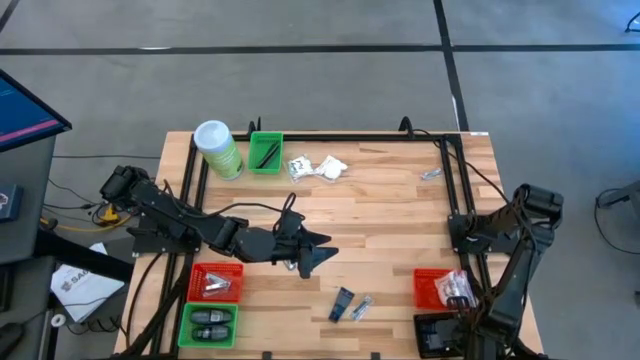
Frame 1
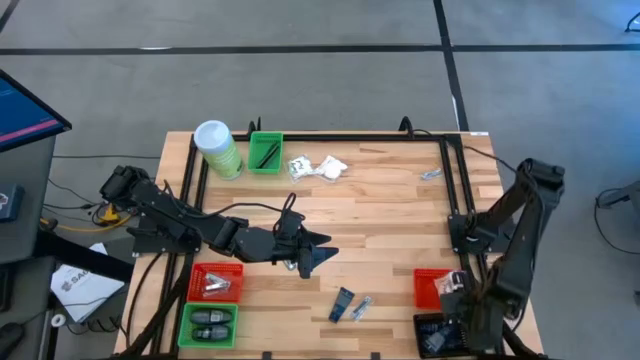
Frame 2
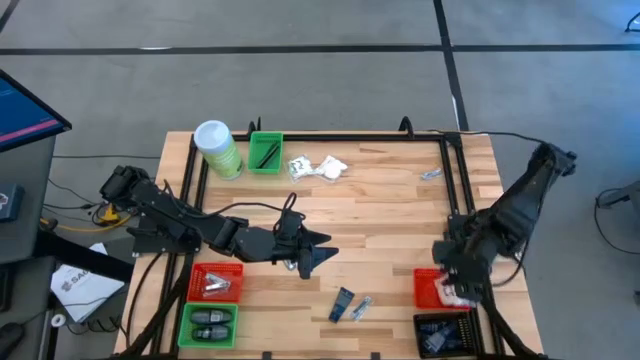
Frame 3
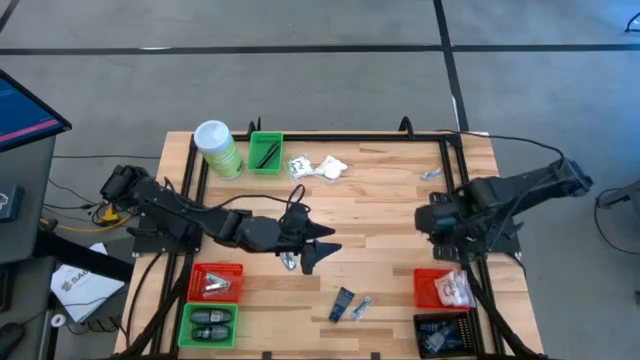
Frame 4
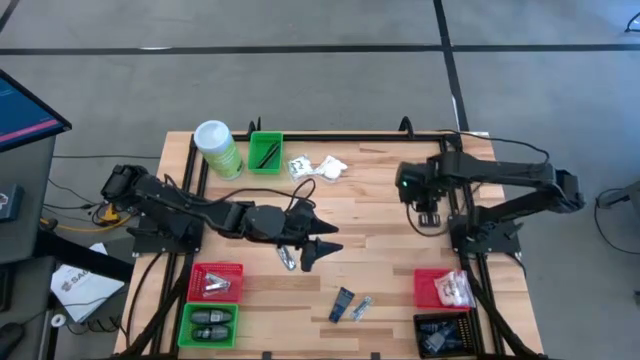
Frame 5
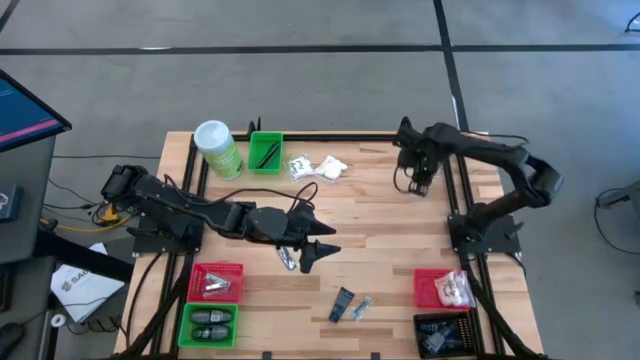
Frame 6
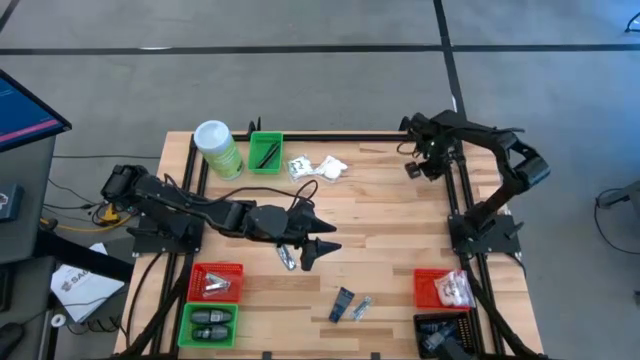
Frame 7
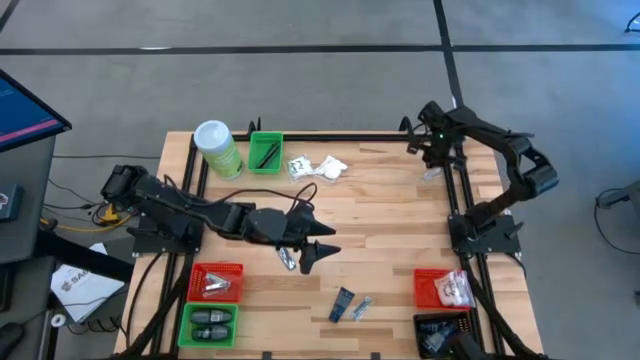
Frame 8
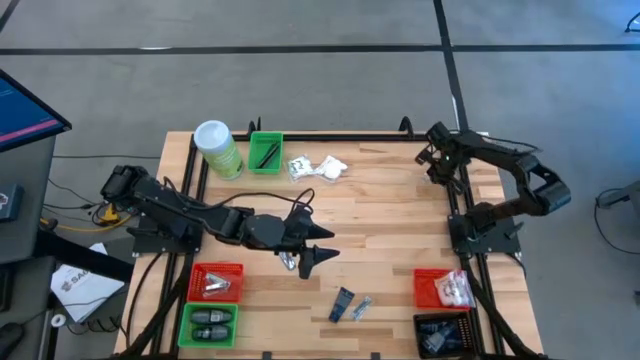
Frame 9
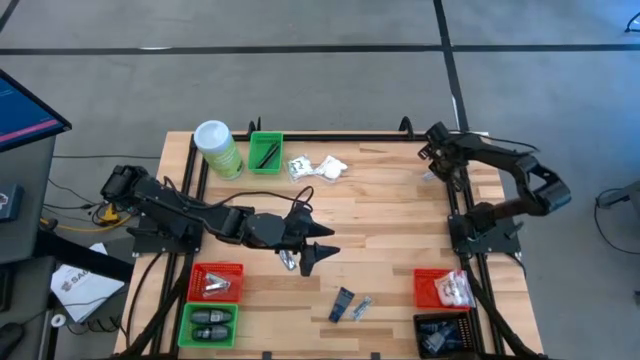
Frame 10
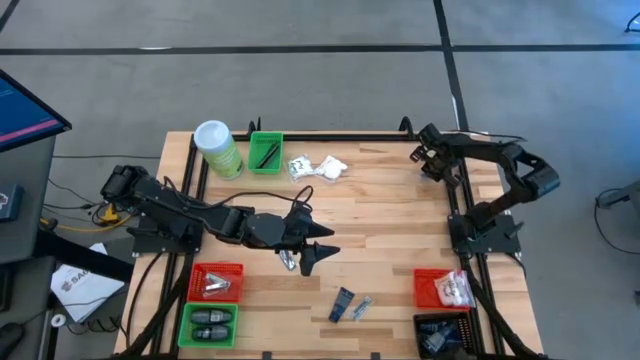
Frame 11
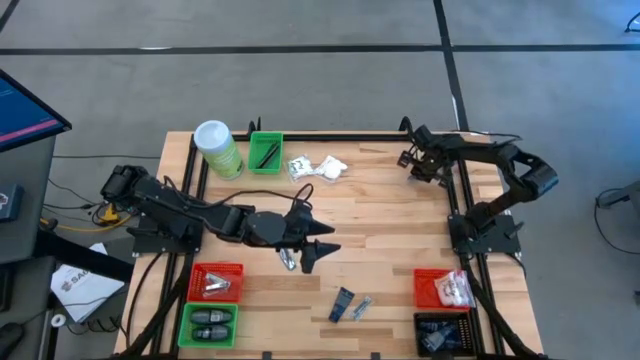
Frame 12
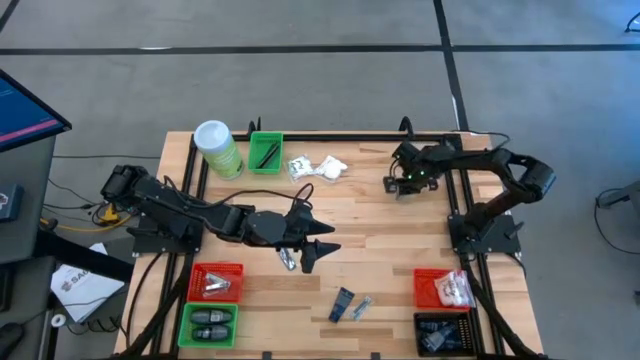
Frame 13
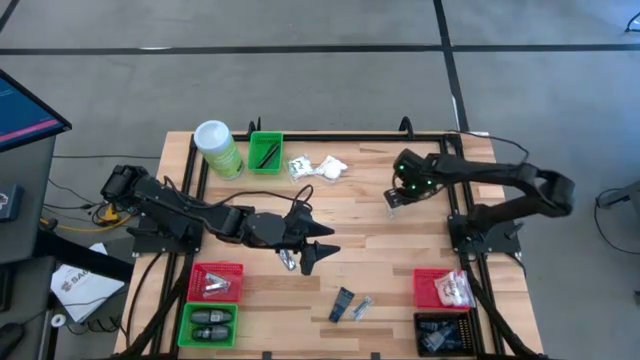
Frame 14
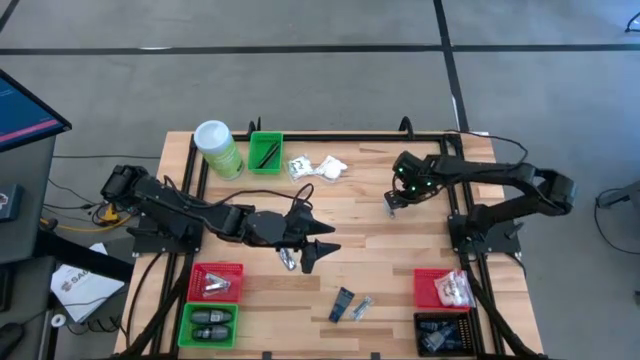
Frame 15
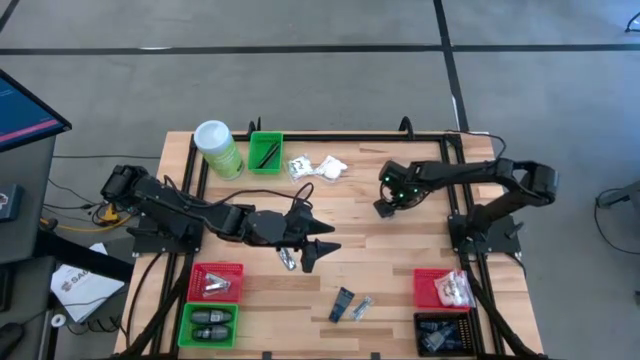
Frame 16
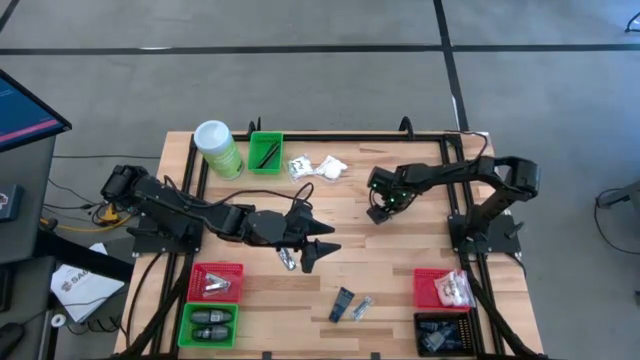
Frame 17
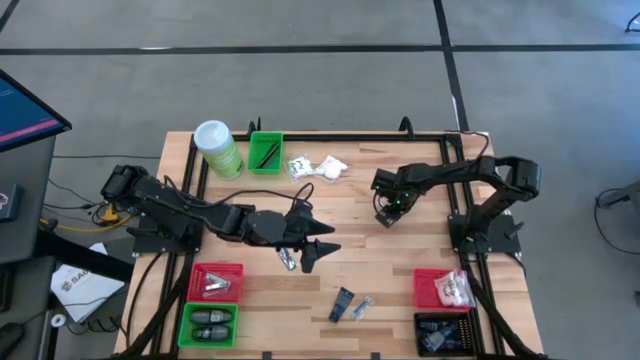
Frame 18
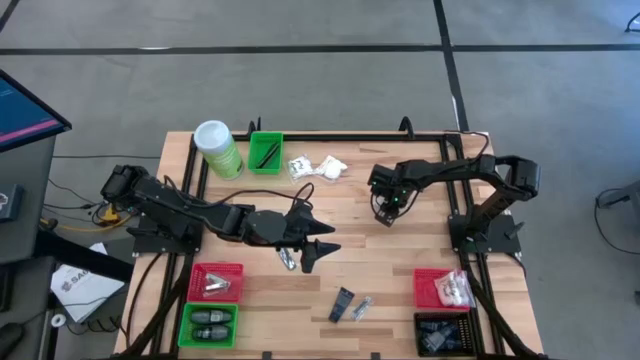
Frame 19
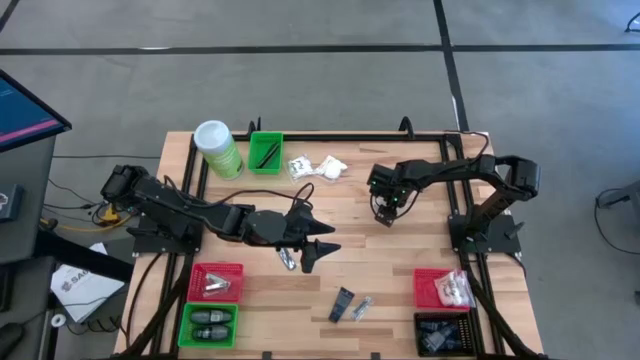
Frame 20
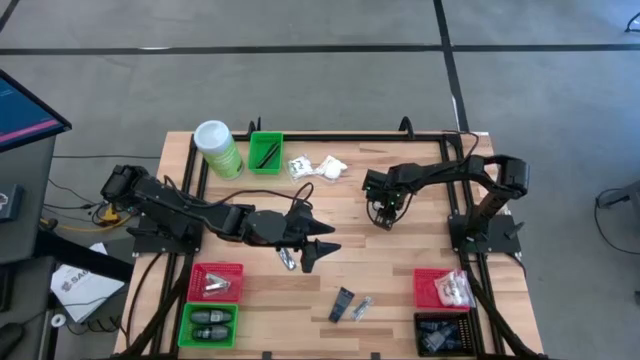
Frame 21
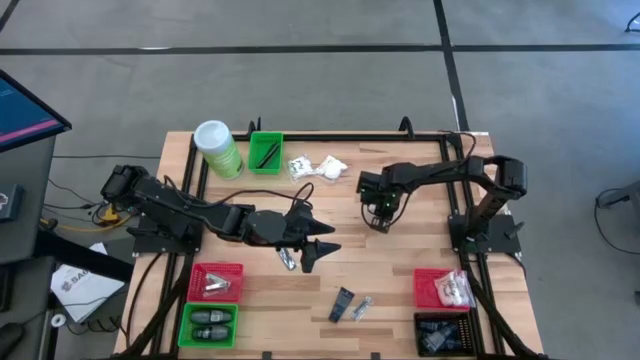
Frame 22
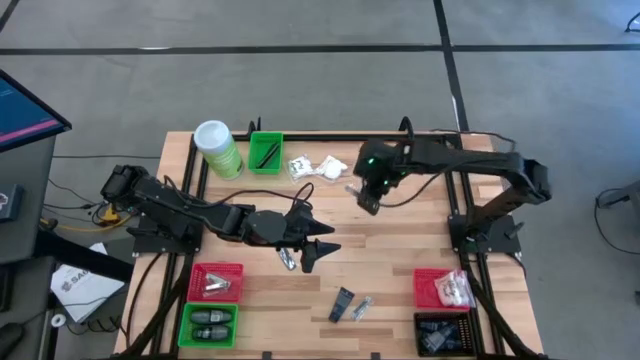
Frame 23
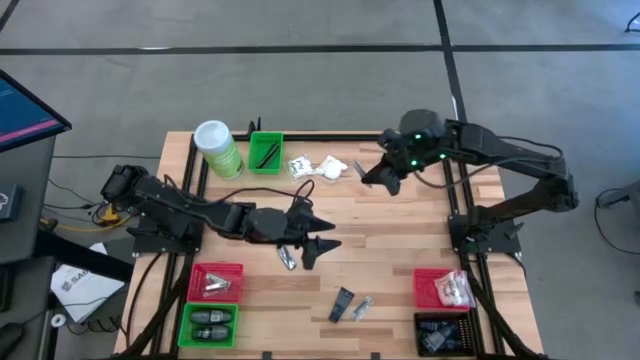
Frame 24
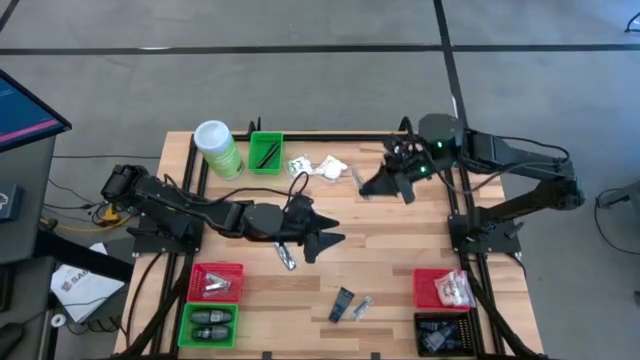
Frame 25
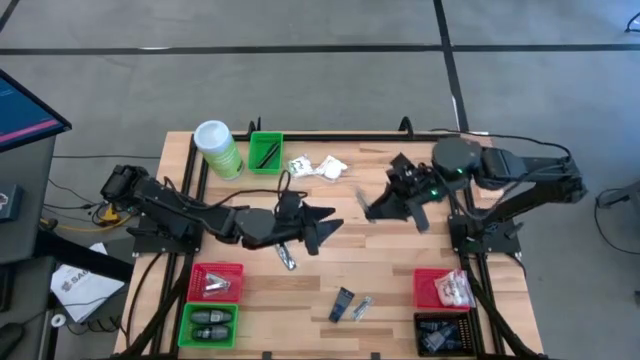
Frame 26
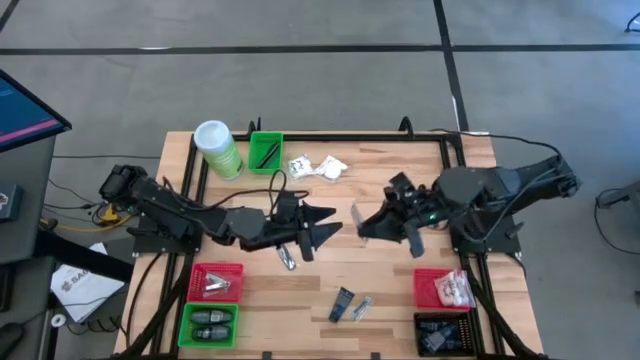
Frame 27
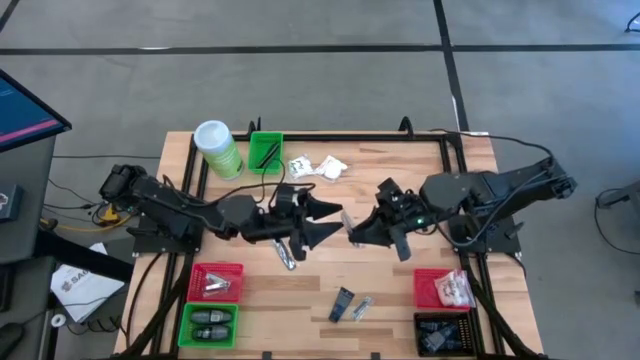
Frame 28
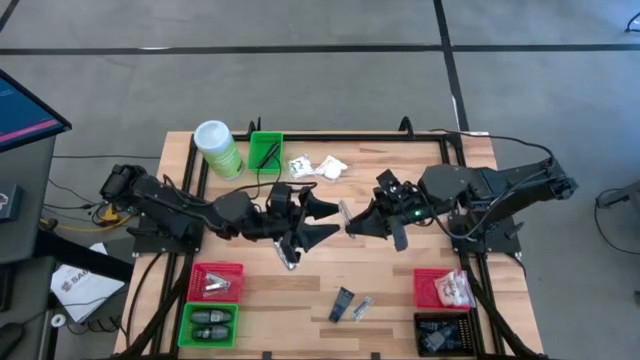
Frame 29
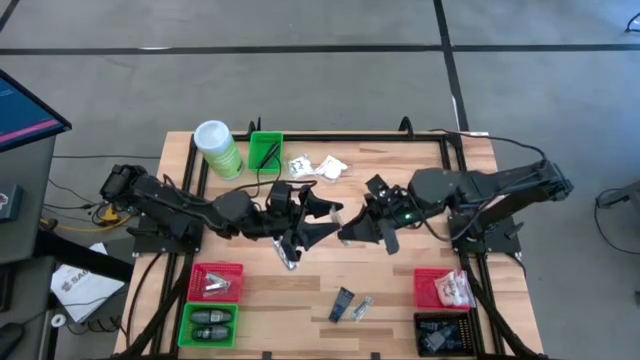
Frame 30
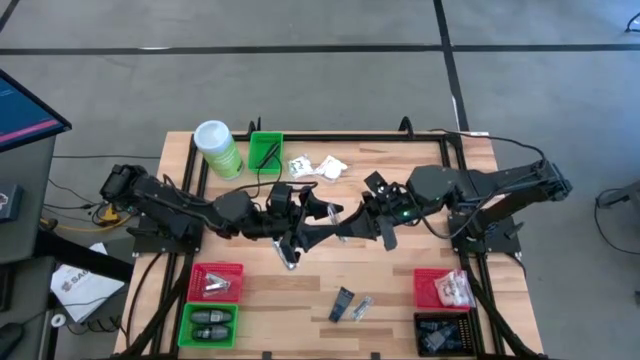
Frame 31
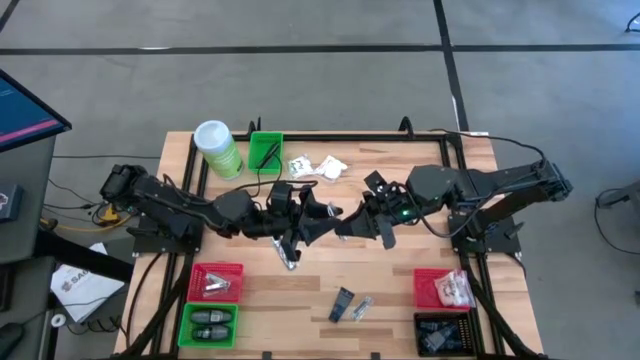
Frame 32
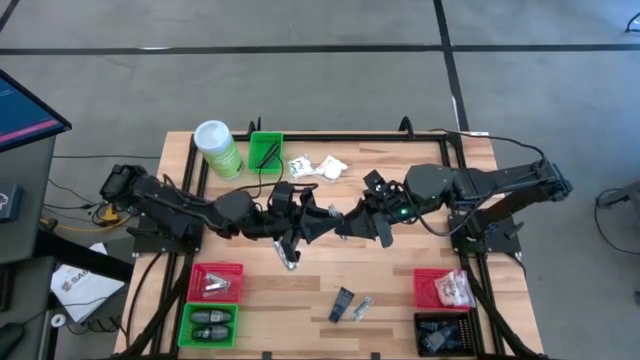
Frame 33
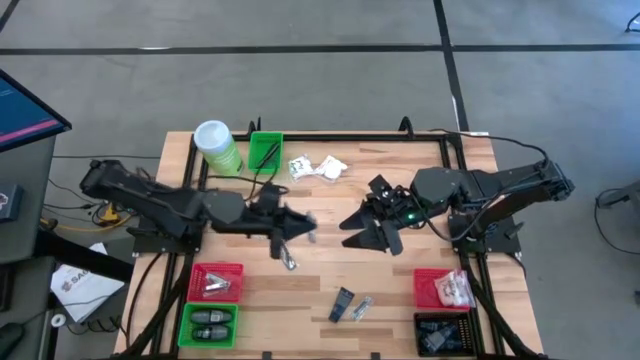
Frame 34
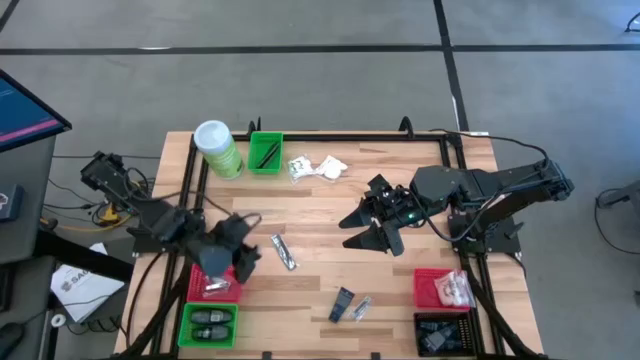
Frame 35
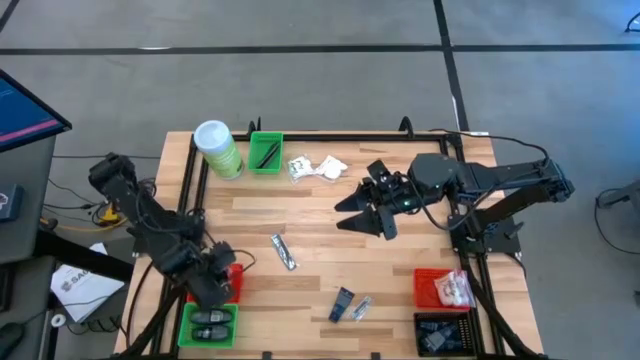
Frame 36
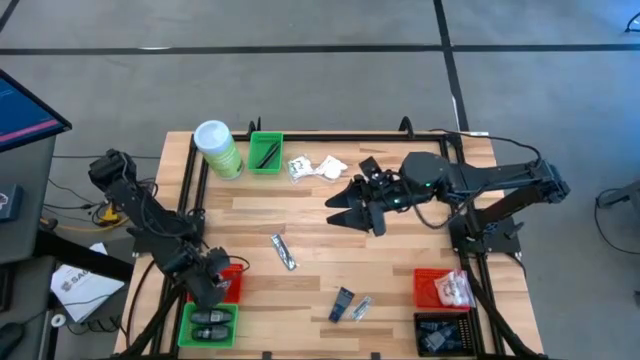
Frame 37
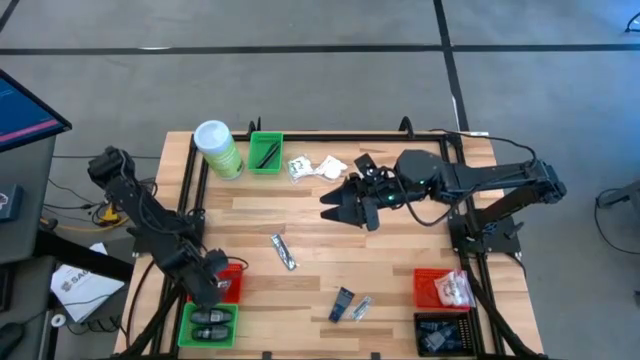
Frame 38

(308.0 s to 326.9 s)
Task: Pick & Place Travel size toiletries
Put the nail cutter into the left red bin

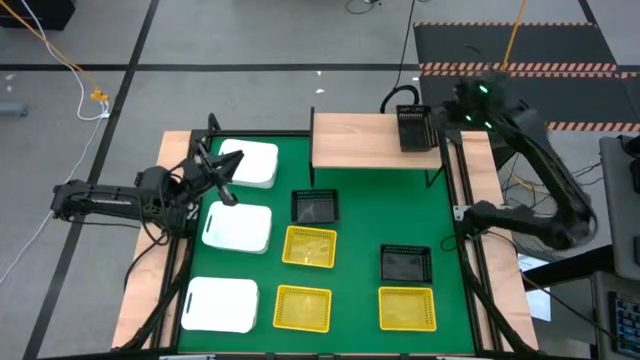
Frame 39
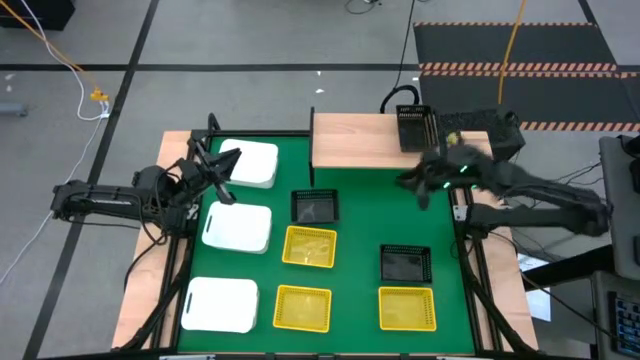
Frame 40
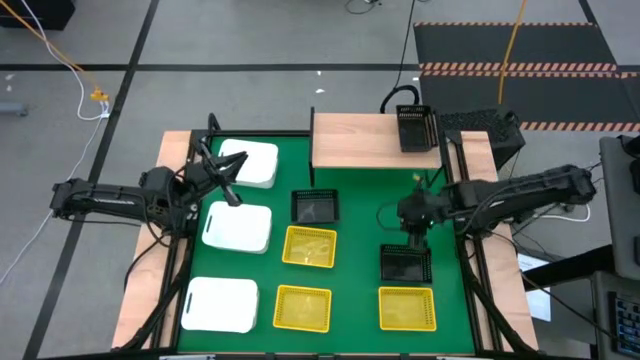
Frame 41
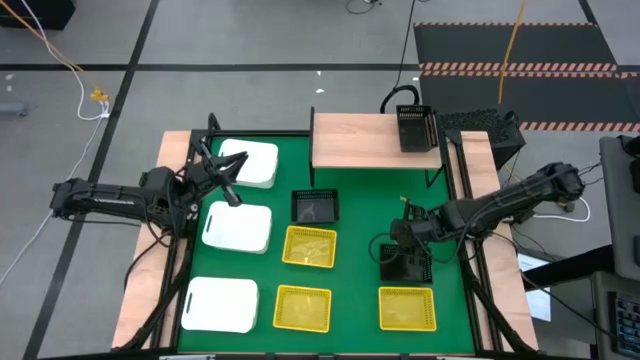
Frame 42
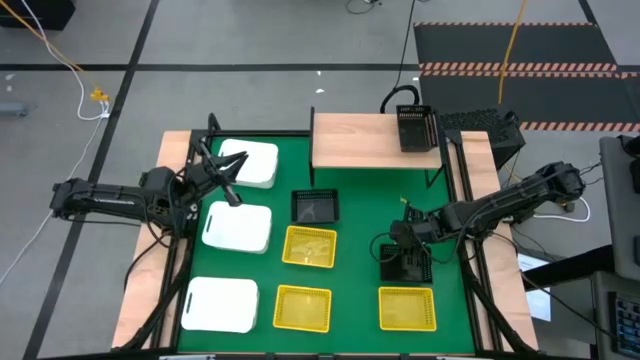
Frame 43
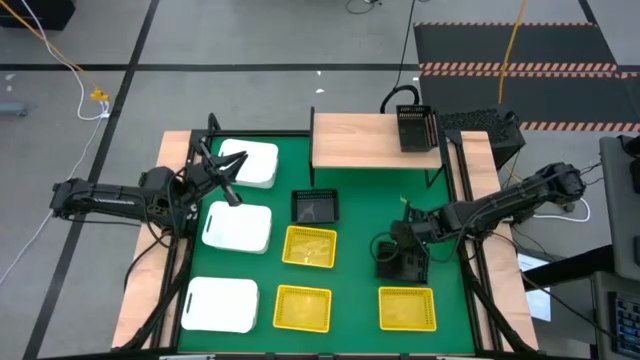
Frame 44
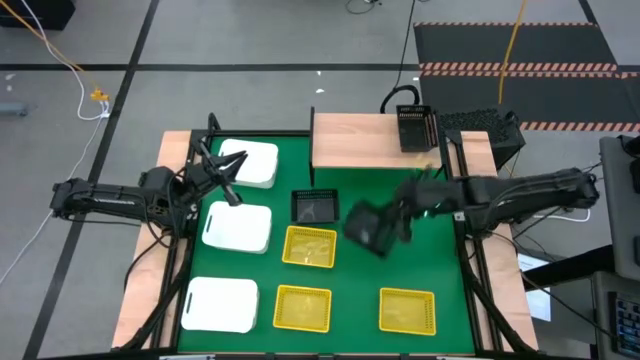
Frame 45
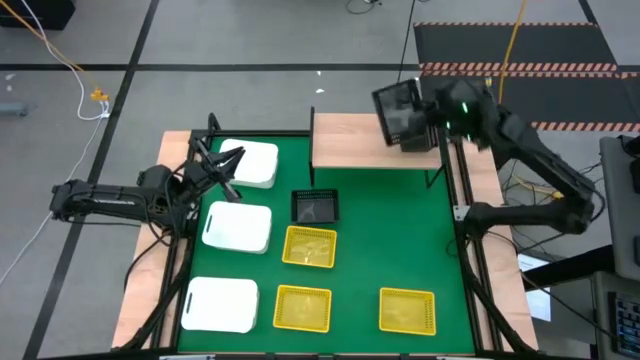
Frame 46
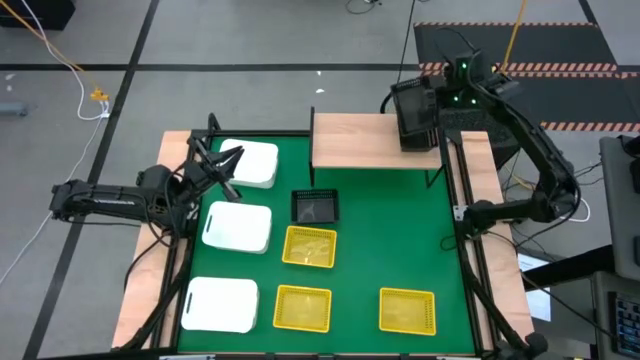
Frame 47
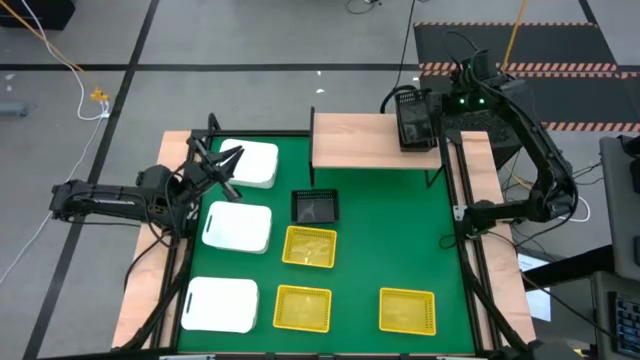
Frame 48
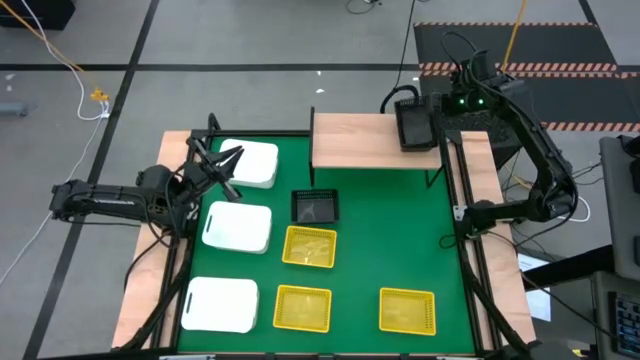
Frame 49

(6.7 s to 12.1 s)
Task: Stack baskets on shelf by color
Stack the bottom black bin into the other black bin on the shelf
